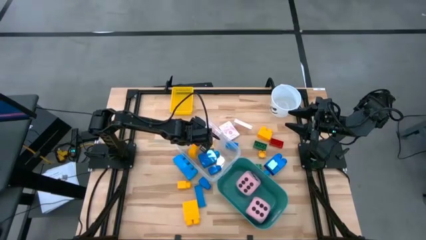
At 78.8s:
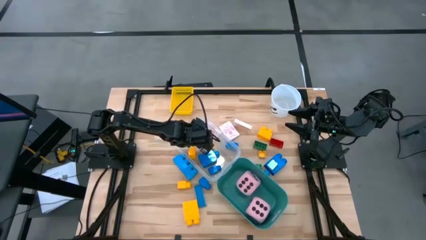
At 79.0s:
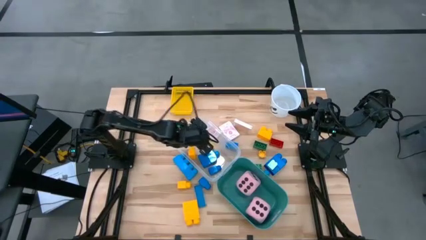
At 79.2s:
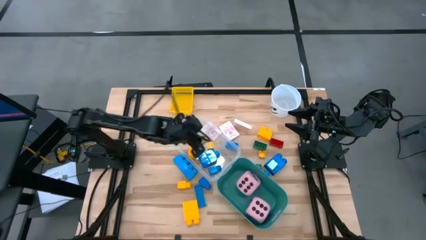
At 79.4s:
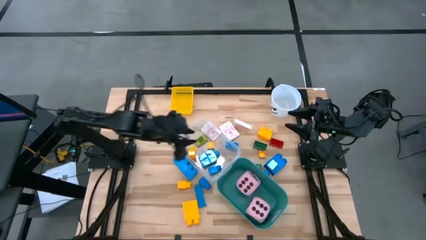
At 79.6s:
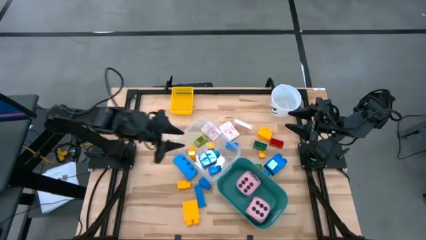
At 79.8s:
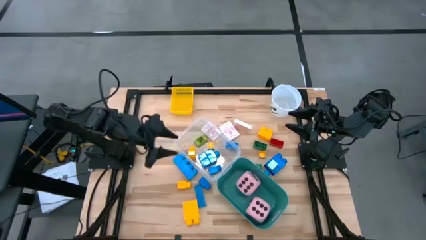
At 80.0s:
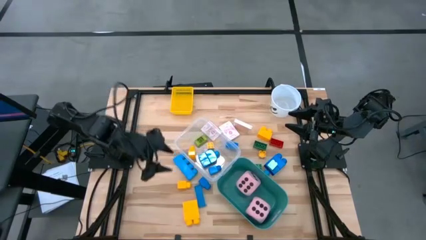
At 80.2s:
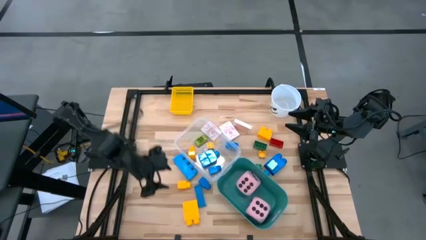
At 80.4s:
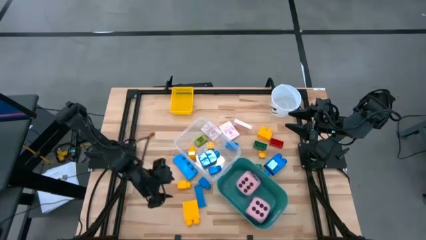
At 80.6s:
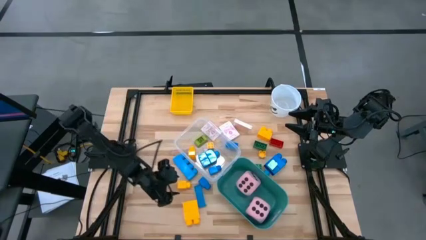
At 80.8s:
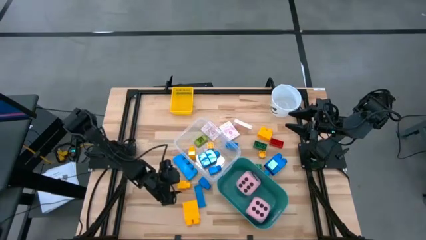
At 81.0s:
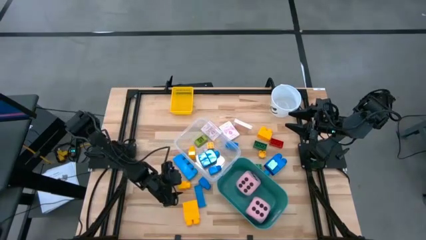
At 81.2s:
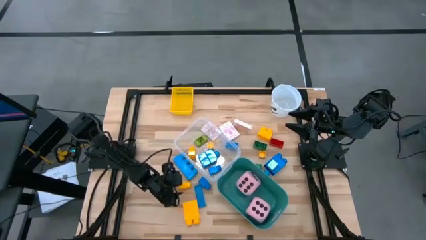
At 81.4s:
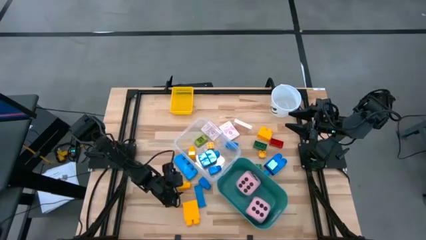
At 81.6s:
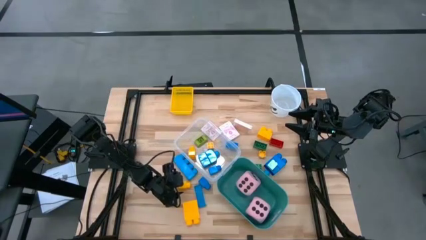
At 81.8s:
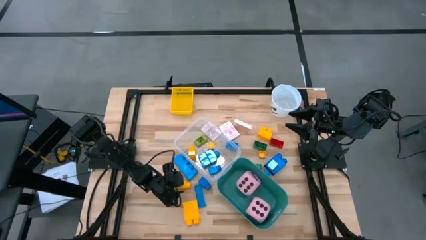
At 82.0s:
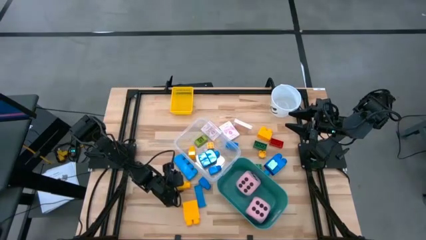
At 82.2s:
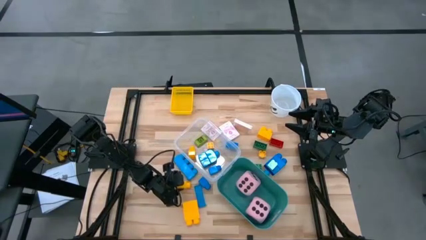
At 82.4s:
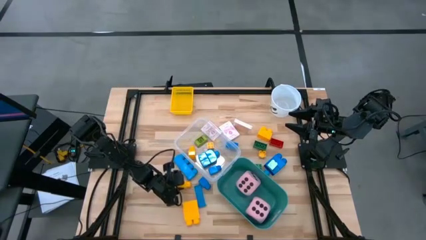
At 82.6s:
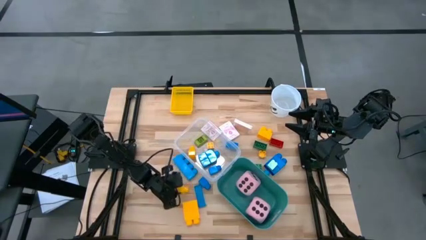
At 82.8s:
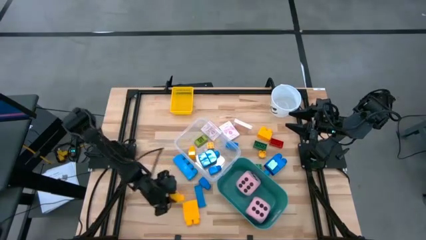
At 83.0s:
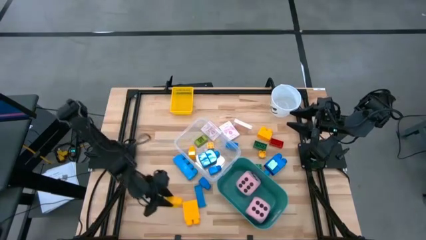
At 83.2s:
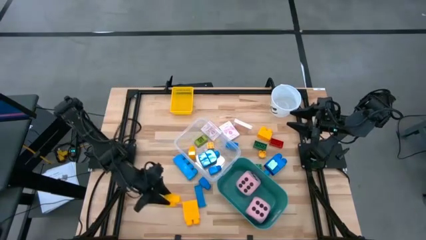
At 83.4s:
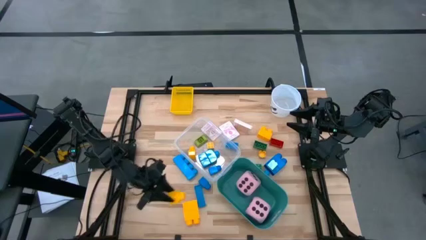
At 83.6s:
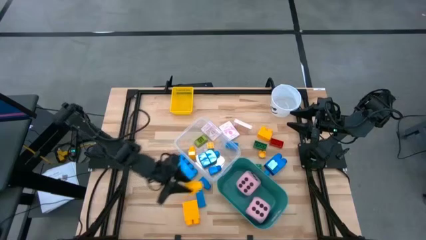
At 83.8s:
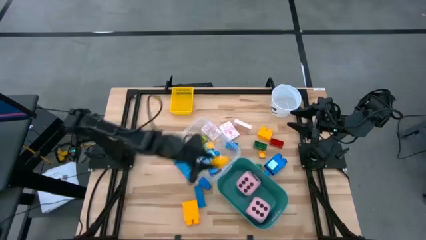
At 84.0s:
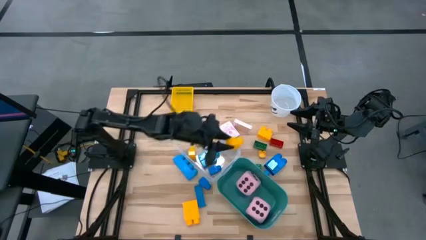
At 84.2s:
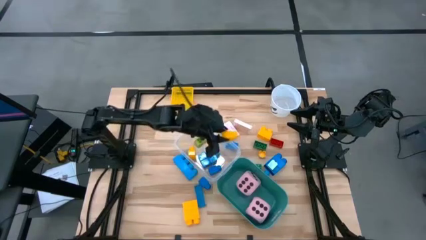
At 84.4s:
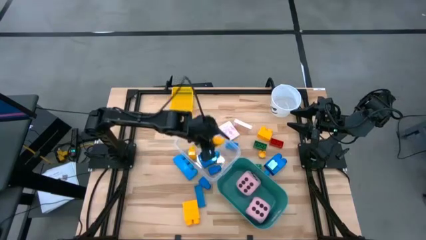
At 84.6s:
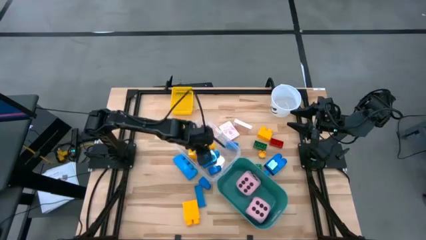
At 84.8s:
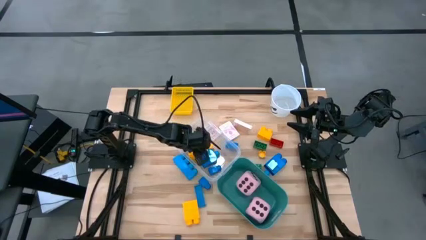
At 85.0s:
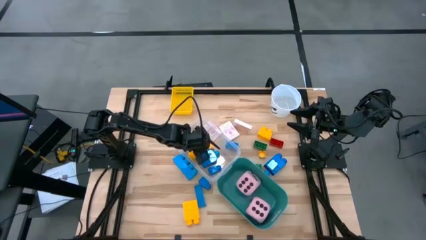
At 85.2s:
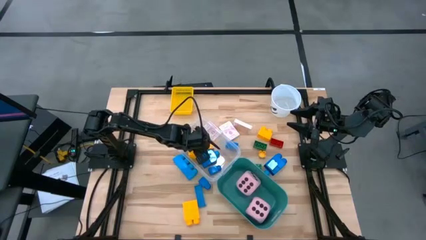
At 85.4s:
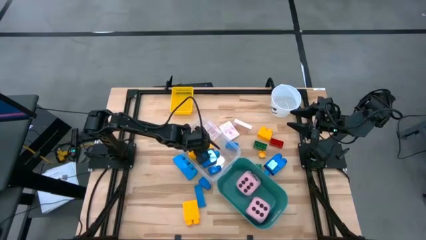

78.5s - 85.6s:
Task: Pick & Place Toys
Put the yellow game piece into the transparent bin

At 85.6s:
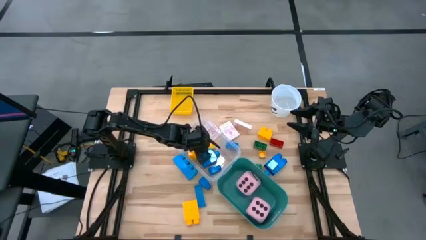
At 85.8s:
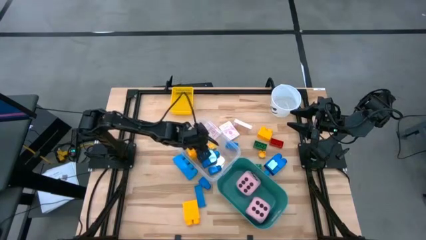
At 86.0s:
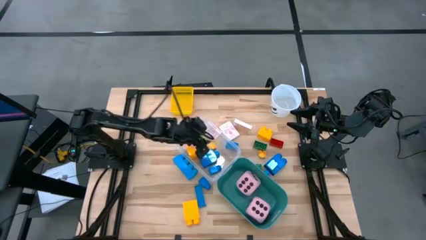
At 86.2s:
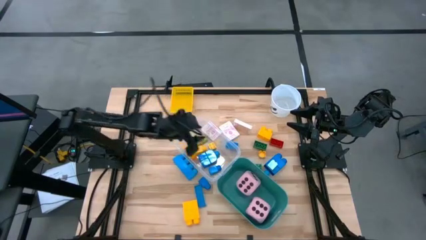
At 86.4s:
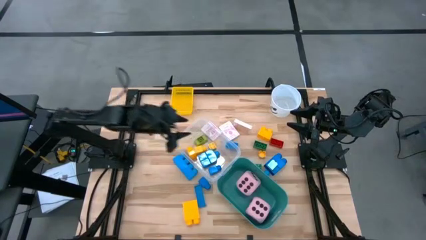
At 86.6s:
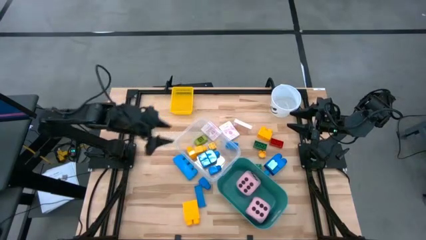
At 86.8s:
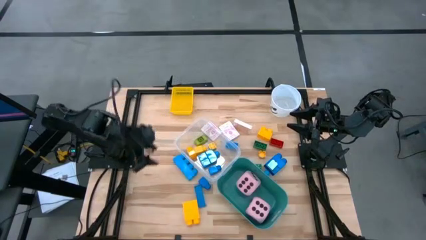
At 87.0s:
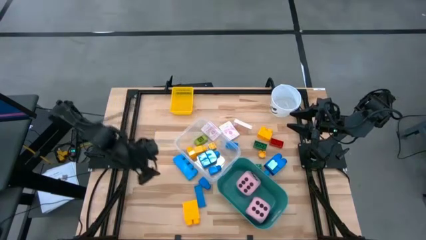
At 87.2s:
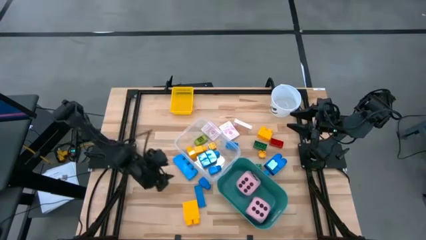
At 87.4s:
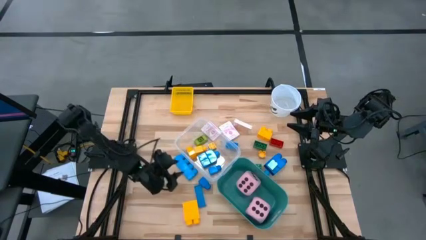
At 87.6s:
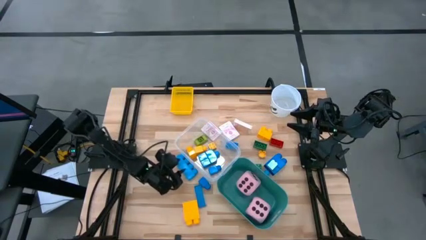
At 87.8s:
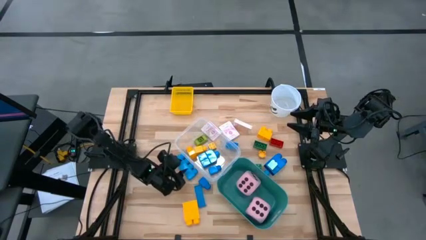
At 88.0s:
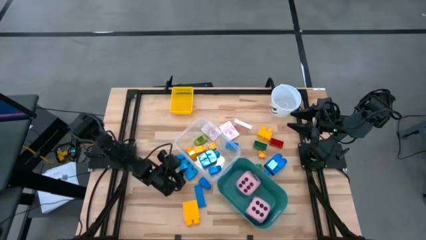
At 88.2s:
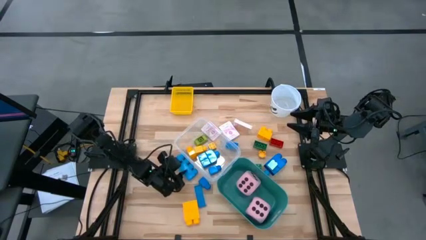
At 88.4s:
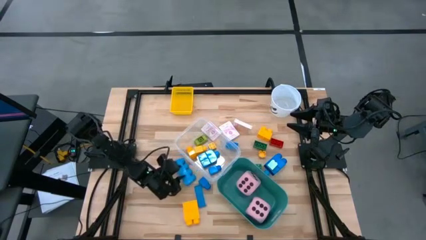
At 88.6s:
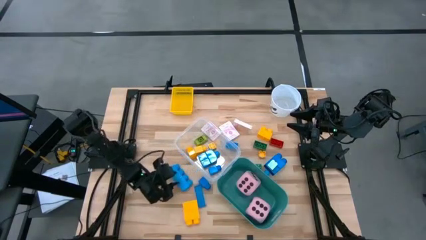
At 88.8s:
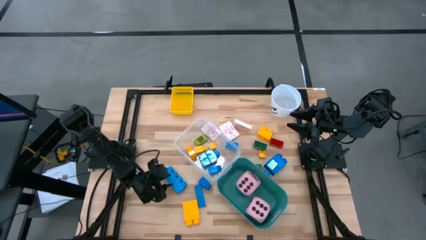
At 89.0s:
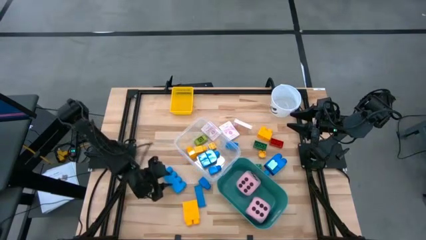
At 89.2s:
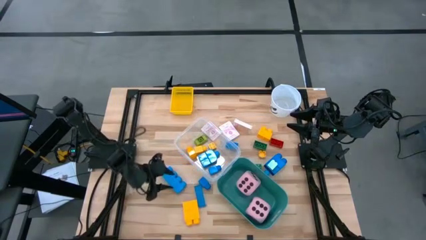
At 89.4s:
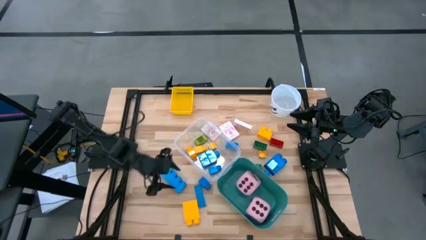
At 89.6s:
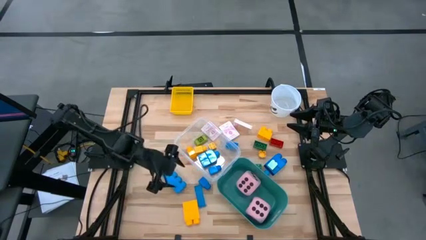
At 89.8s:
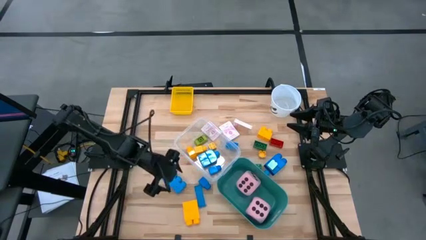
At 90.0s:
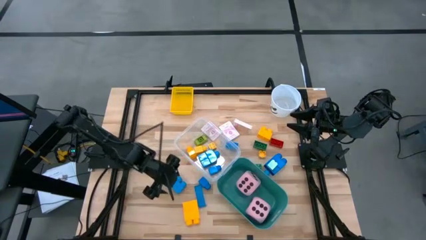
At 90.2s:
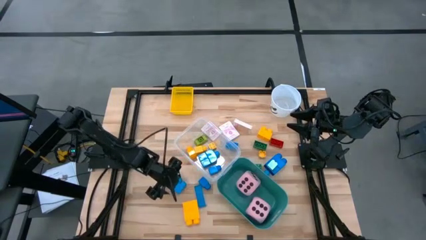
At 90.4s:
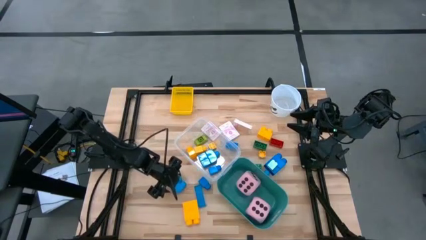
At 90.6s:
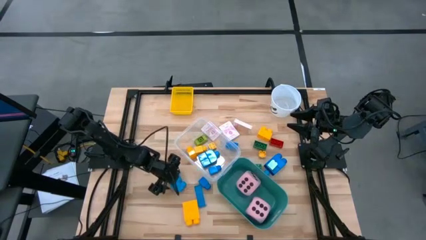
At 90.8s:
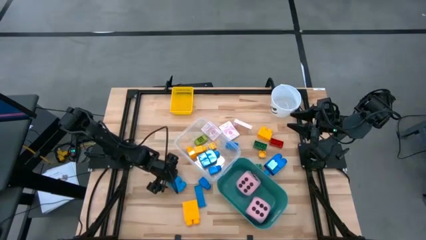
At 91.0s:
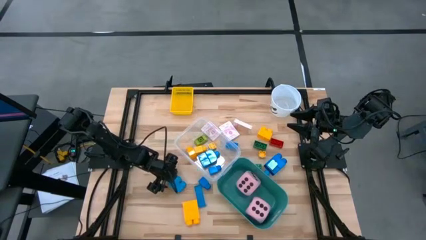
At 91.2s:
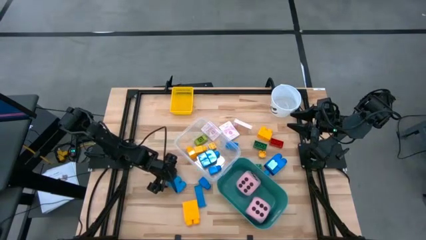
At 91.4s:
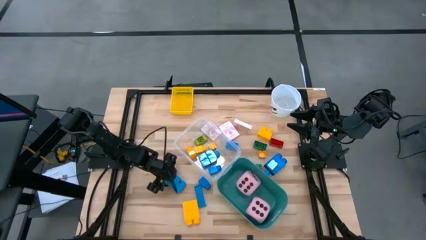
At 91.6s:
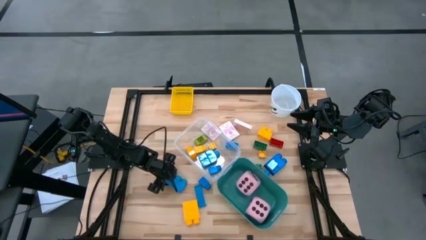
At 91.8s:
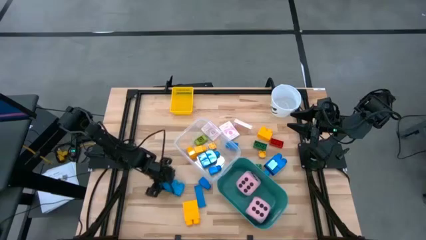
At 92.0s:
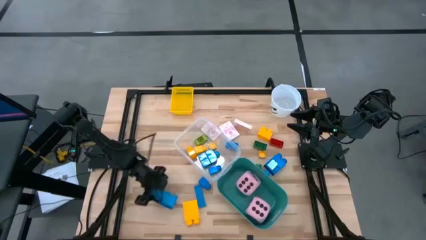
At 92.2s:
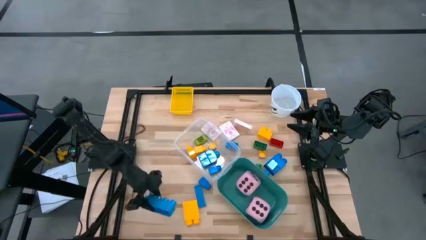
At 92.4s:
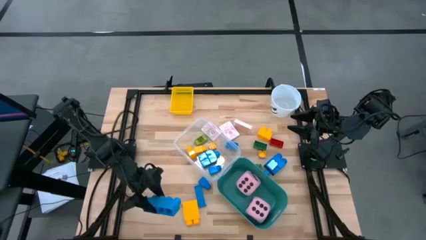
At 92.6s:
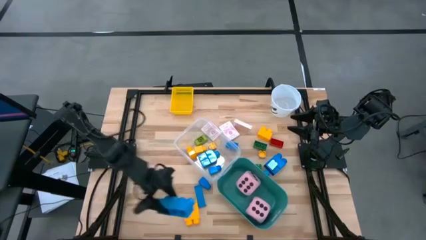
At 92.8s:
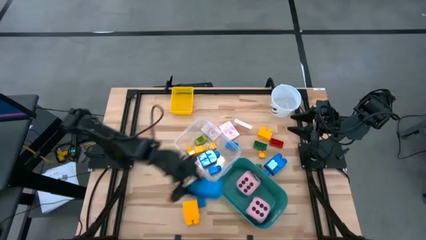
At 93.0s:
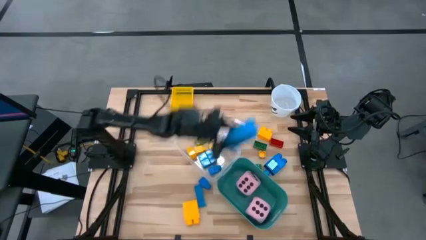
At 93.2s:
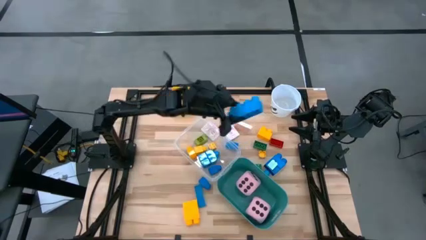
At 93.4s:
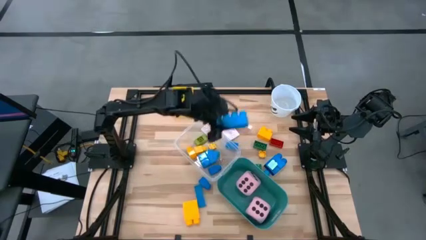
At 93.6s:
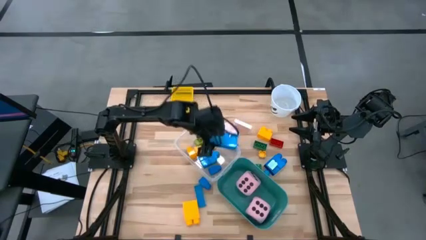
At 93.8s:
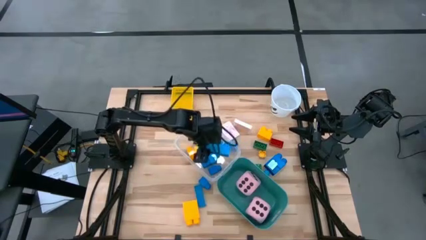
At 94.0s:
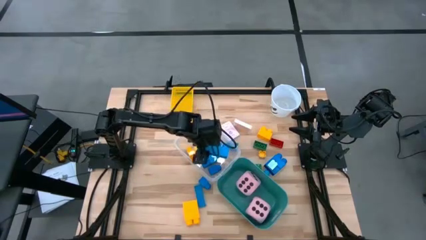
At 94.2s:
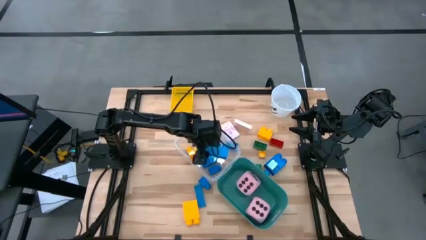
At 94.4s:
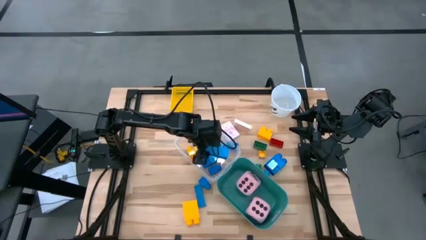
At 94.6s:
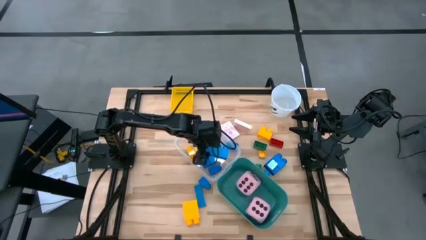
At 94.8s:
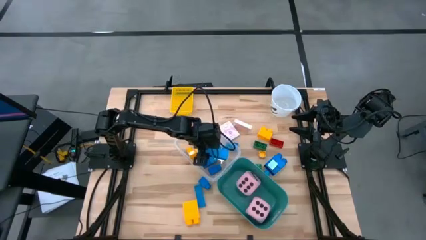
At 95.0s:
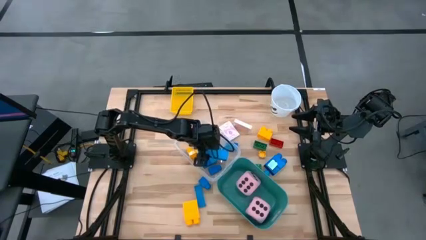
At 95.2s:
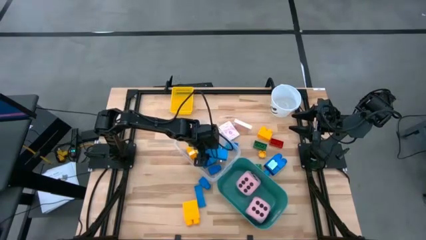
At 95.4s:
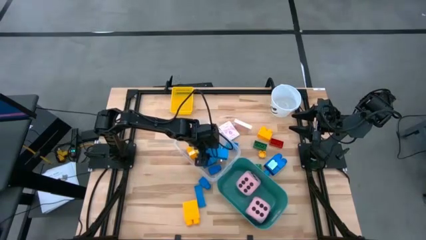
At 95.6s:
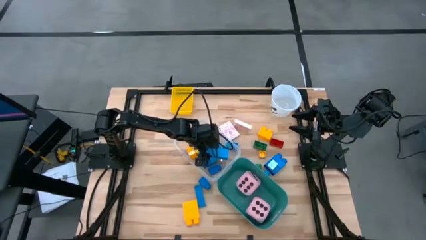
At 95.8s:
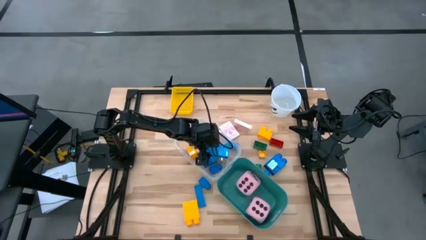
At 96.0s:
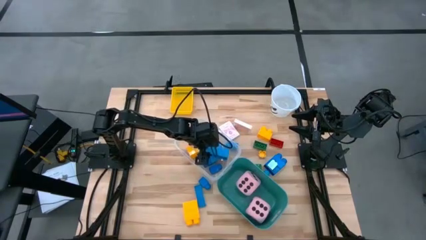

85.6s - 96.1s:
Put the blue game piece into the transparent bin
